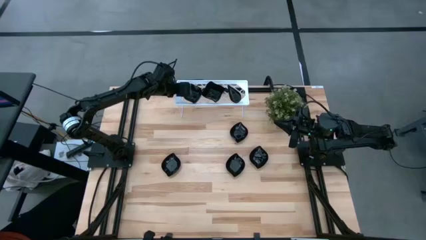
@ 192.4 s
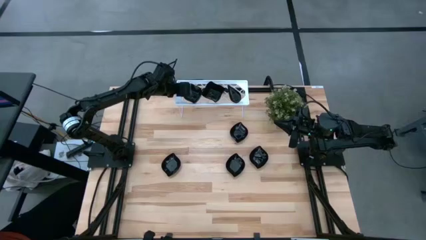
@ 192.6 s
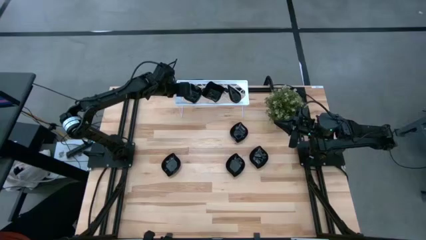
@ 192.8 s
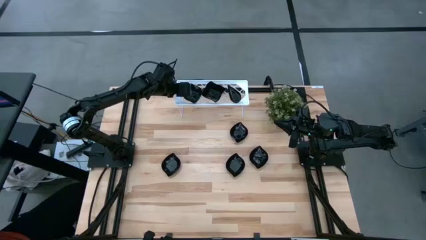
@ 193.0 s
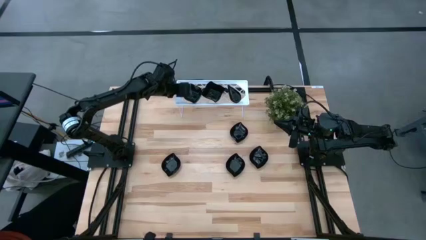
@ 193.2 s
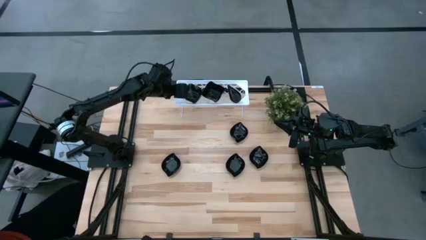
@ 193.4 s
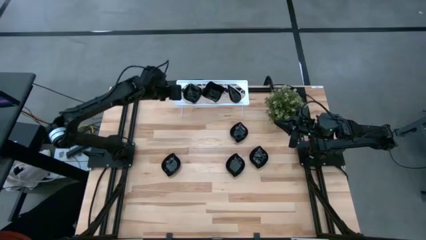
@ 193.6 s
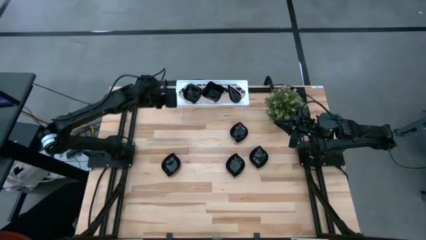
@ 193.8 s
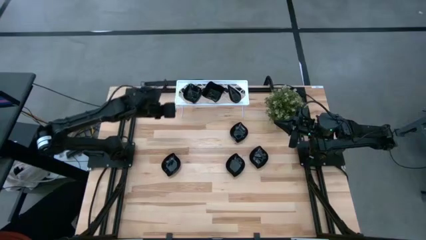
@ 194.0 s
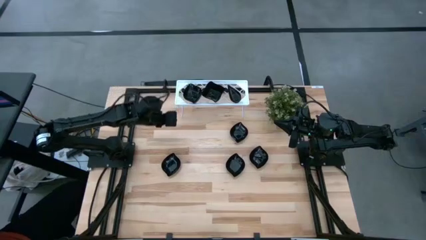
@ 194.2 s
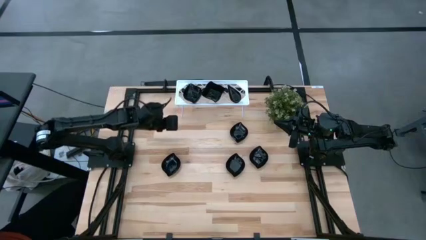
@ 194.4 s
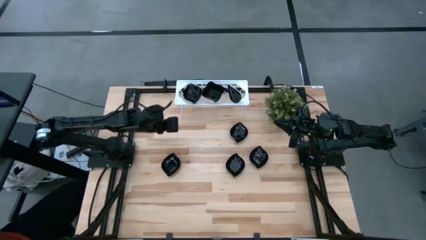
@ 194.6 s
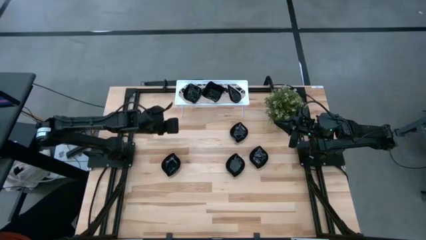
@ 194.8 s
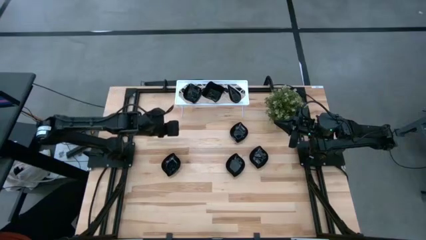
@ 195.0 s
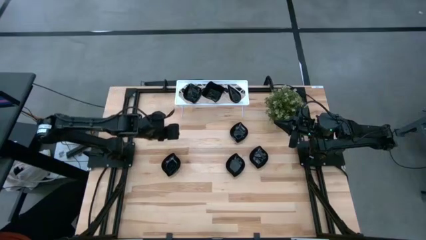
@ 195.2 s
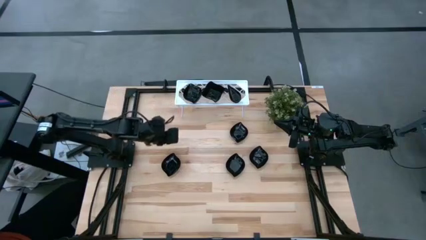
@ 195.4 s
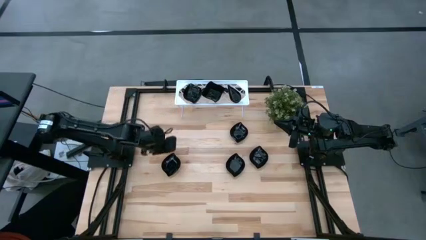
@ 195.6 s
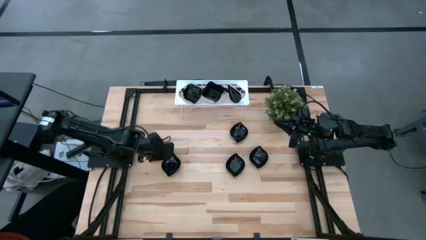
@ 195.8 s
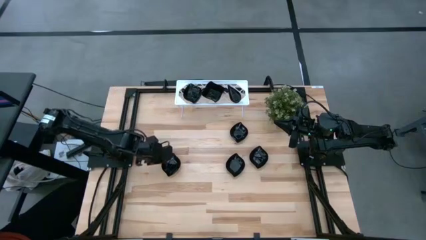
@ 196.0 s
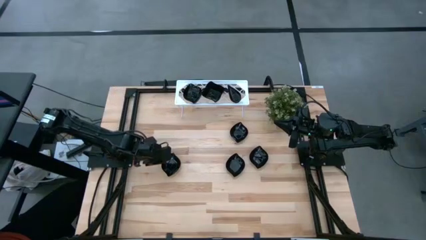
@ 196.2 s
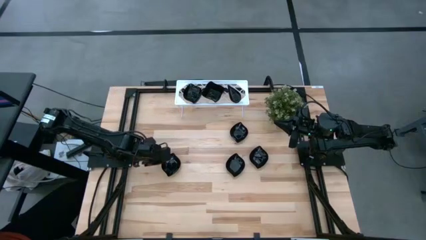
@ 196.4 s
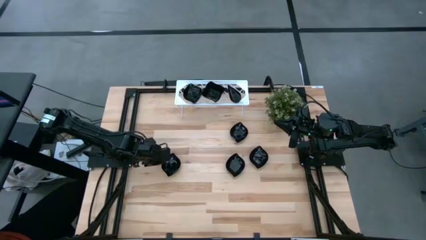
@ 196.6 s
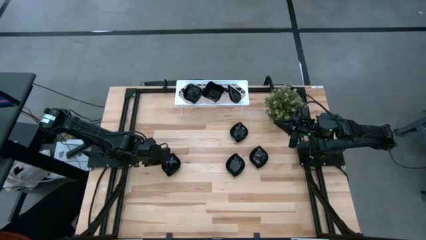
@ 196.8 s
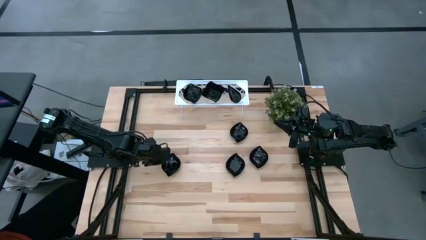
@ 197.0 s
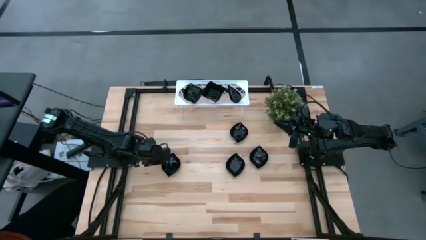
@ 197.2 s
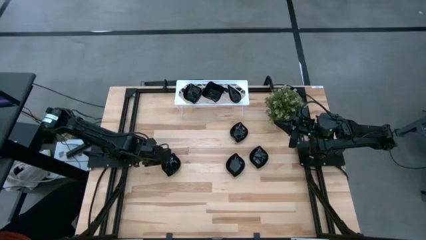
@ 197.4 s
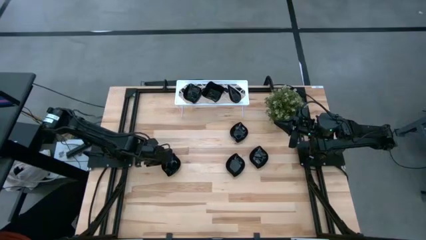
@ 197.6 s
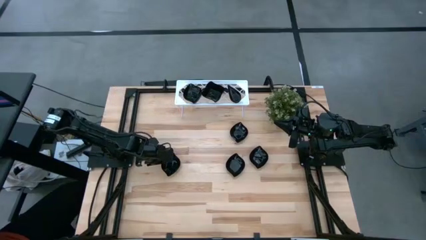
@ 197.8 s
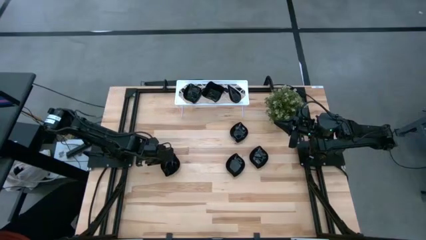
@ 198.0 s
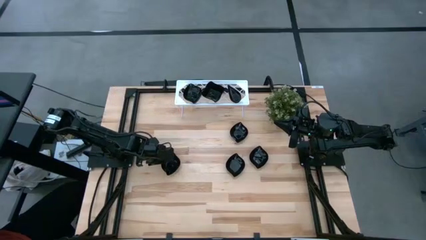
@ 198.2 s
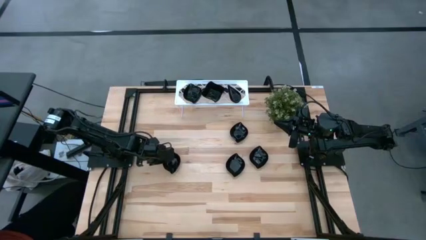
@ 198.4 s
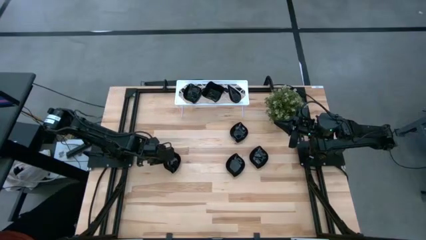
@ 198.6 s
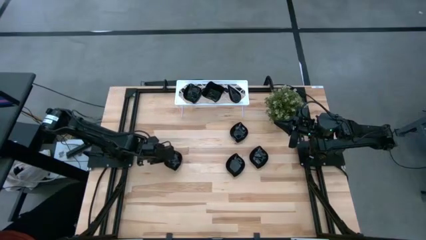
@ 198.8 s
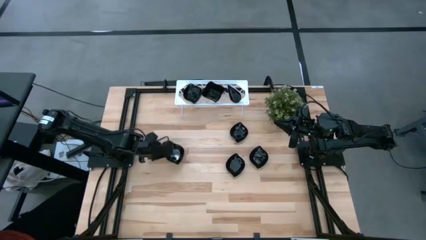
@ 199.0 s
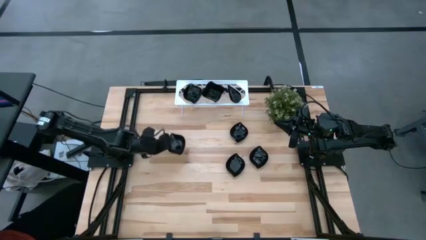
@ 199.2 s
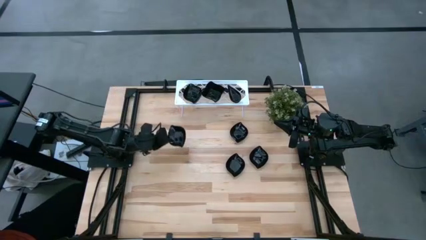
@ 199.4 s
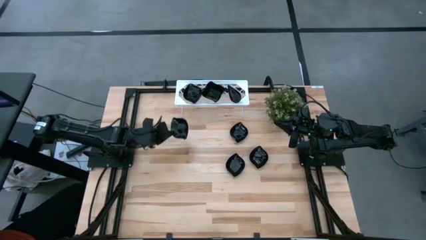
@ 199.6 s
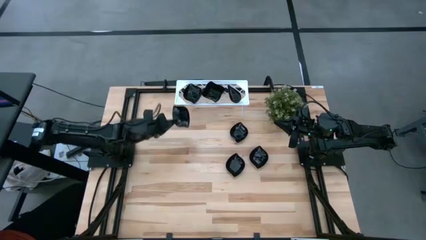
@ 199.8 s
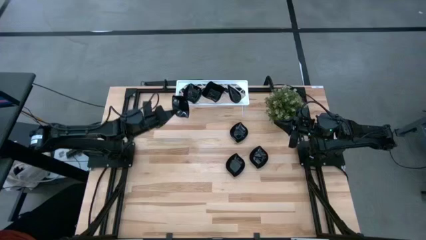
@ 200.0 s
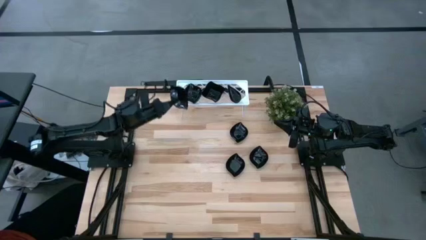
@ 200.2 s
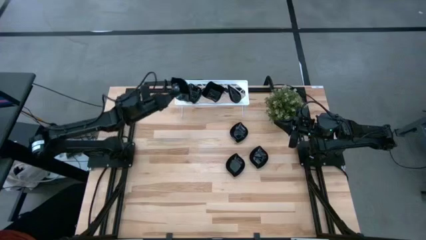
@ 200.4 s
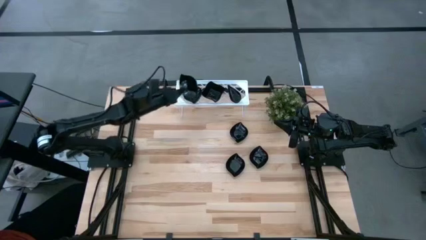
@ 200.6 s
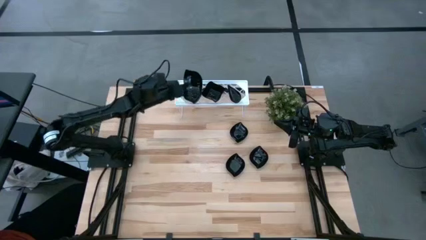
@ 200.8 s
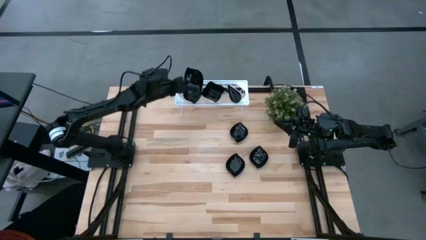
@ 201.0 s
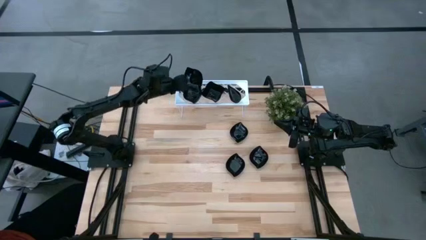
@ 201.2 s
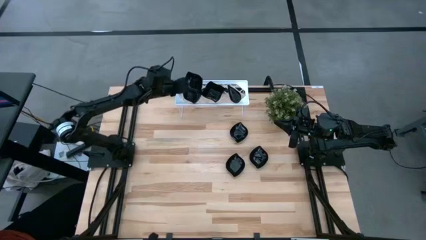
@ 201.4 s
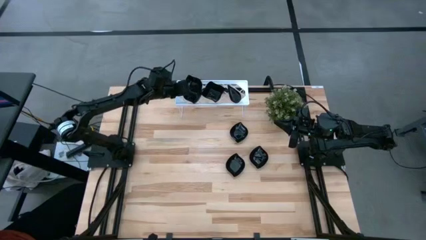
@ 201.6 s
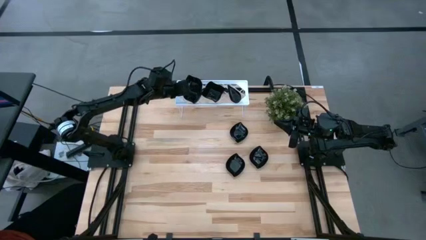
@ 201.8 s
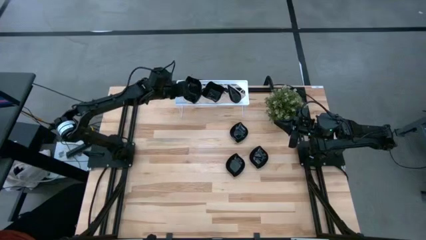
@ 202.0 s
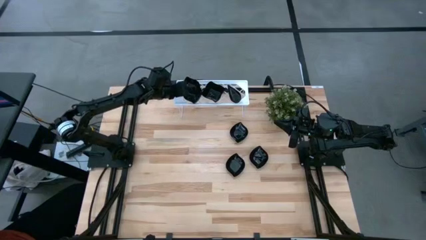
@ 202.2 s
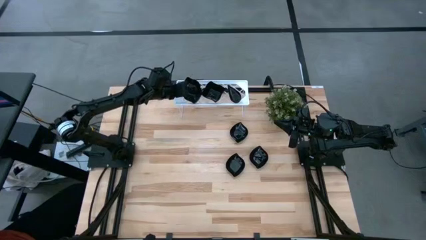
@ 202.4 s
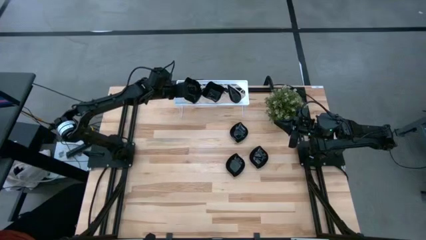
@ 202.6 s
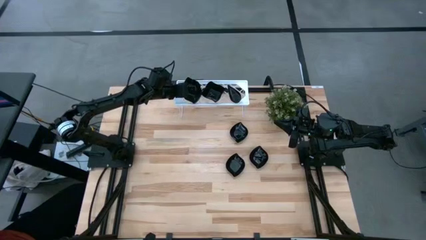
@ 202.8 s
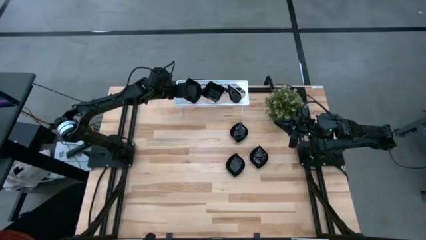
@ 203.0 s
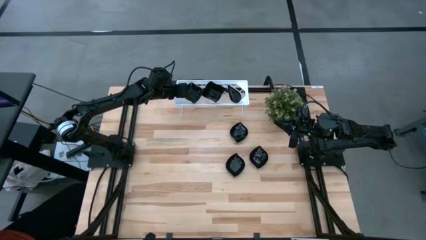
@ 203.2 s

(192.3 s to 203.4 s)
Task: Pick & Place Mini shaped plates
Stack the leaf-shaped plate on top of the other leaf-shaped plate on the shelf

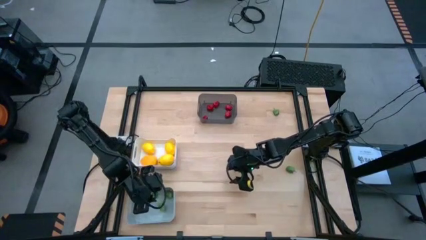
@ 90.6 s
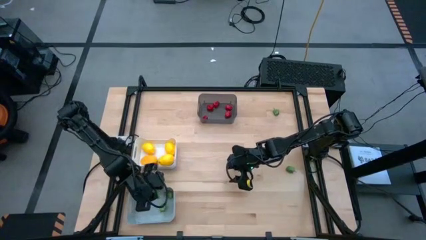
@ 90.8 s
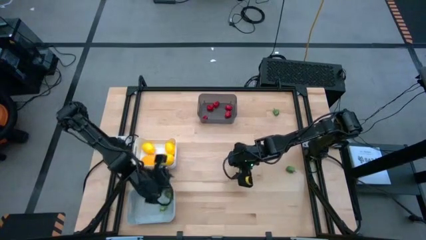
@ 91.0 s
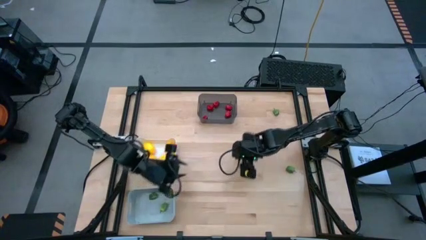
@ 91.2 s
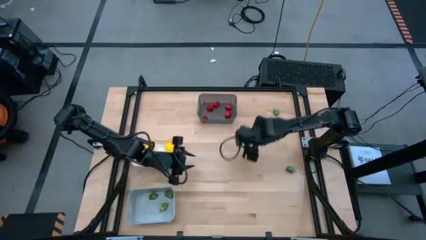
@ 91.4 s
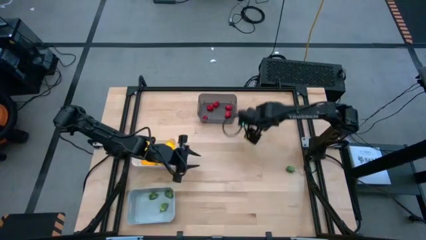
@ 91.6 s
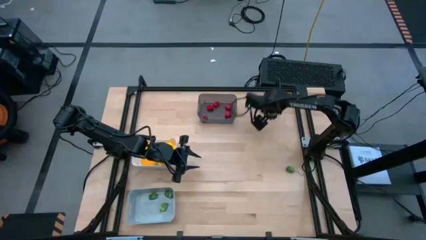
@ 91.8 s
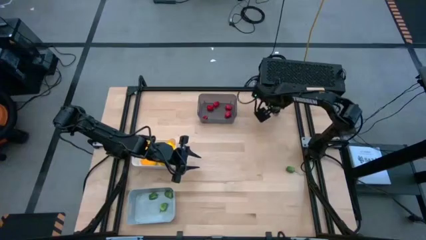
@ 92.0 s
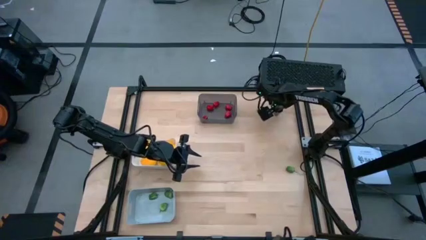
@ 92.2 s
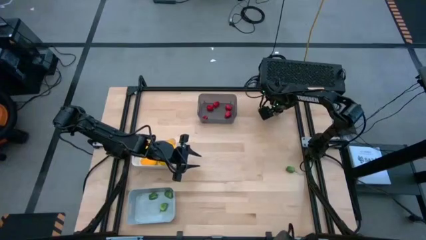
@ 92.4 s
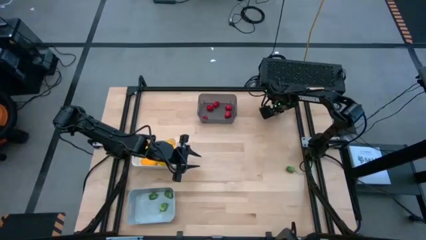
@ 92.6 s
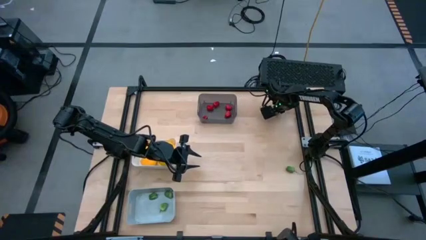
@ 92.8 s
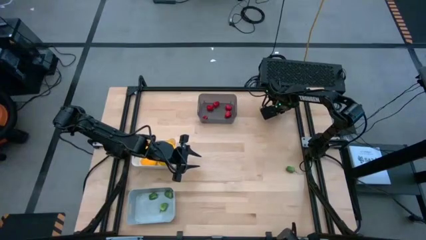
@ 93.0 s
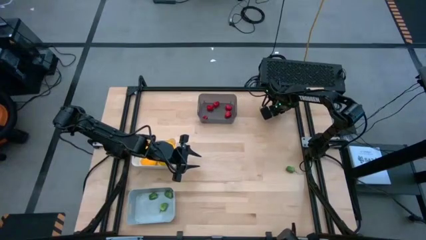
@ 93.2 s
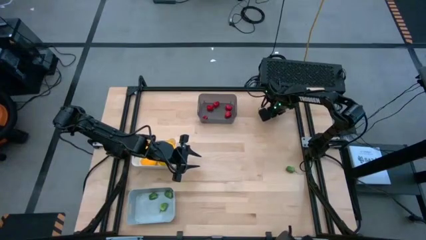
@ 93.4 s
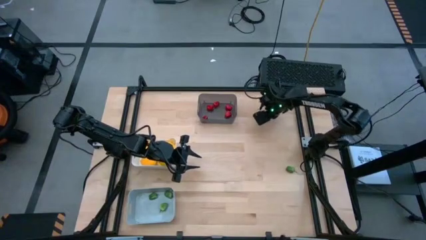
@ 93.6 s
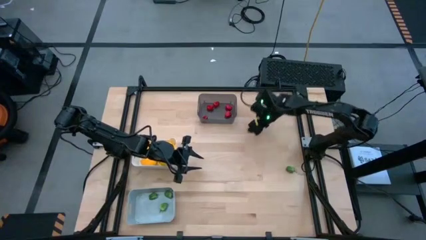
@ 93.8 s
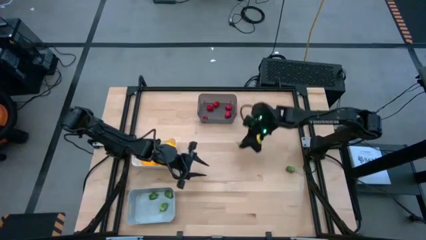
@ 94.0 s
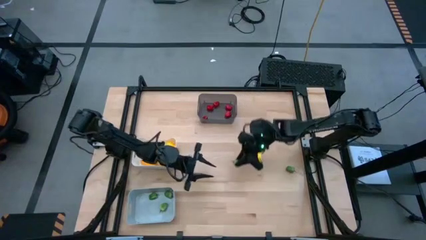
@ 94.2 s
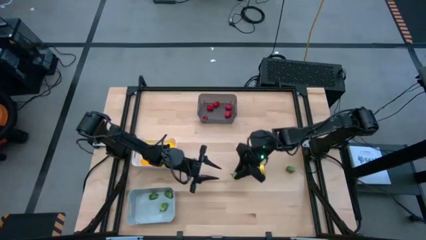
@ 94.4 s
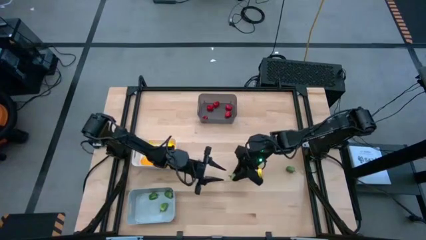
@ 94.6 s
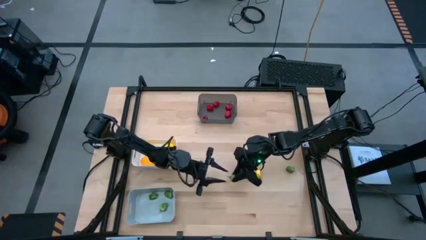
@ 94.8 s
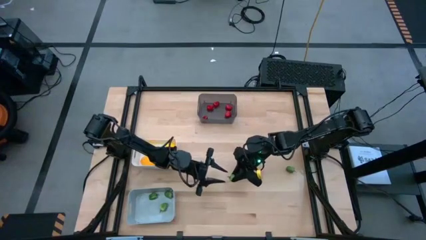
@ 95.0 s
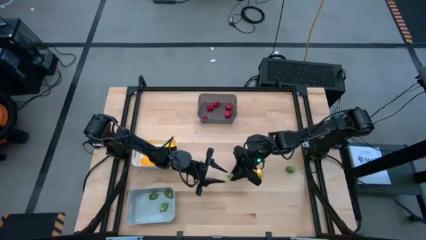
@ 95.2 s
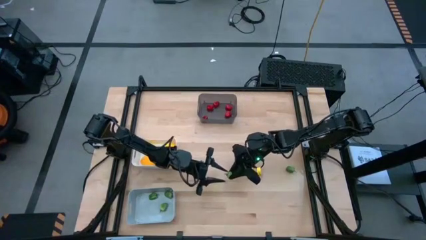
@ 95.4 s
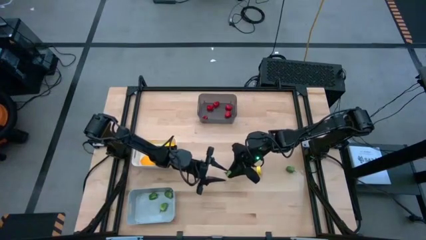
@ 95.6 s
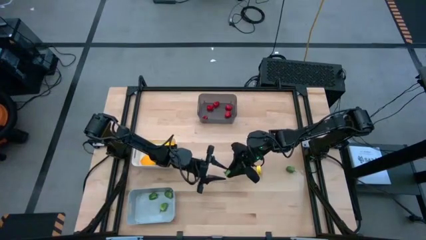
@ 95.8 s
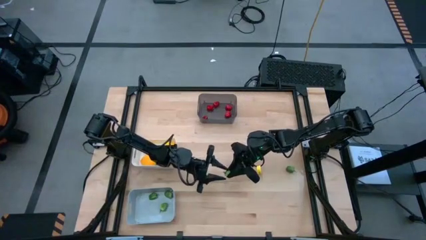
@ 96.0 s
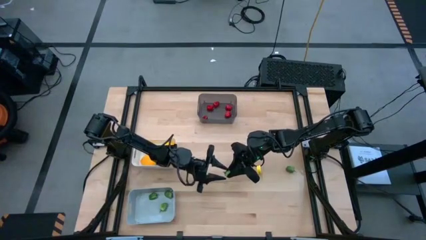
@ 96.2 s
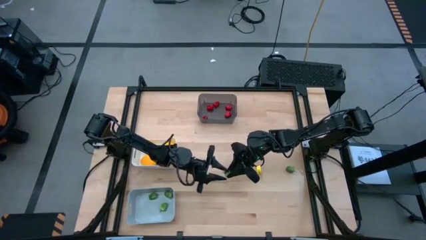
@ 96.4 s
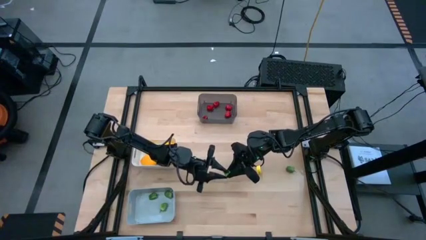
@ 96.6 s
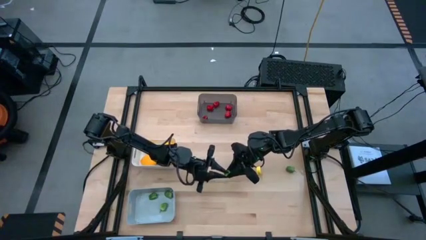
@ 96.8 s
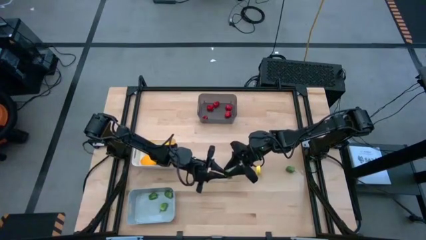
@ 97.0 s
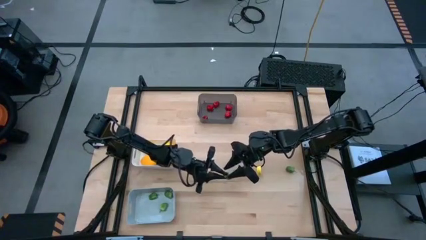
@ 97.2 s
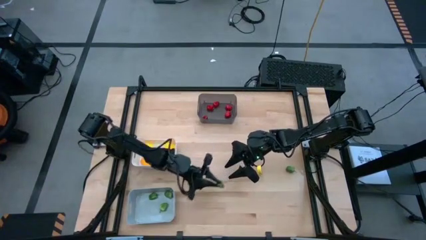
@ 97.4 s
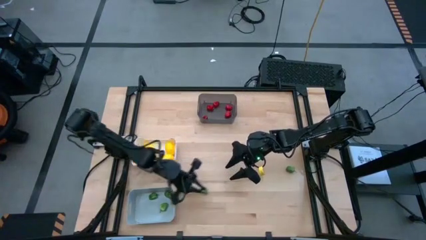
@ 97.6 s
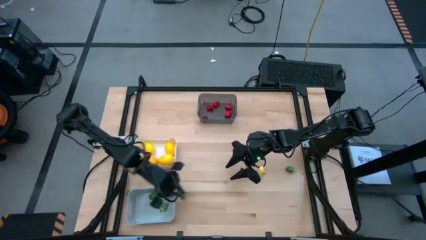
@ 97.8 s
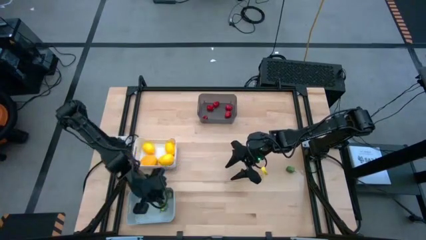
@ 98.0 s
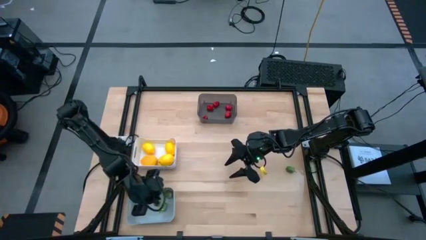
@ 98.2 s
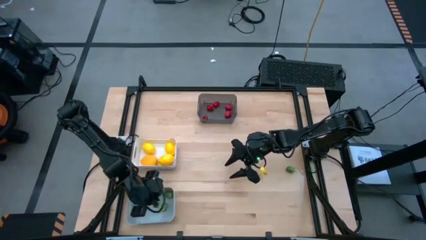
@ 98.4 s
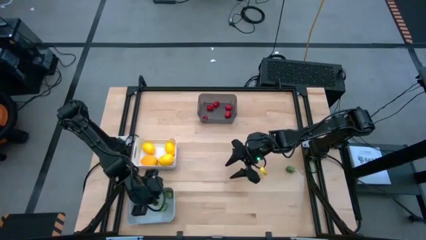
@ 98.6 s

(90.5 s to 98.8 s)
Task: Sort produce into baskets
Put the green chili pepper into the gray bin
